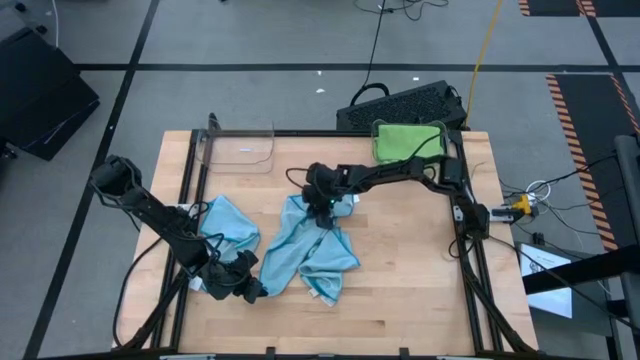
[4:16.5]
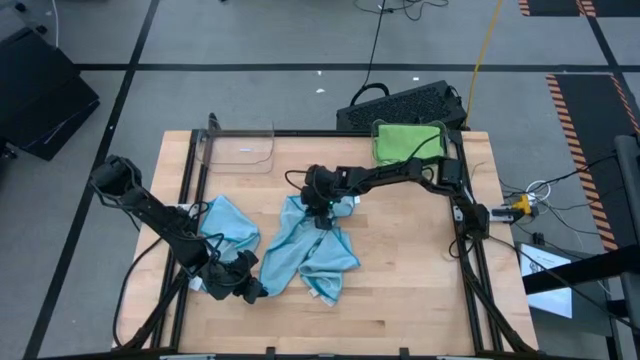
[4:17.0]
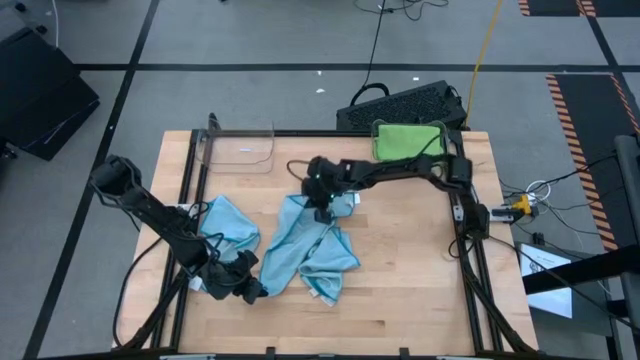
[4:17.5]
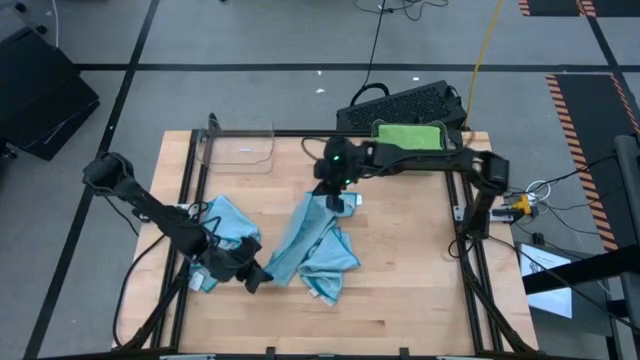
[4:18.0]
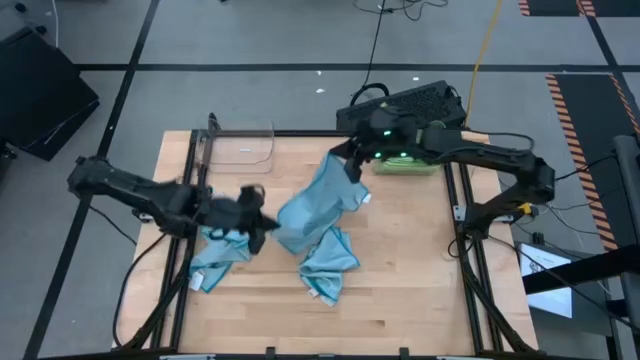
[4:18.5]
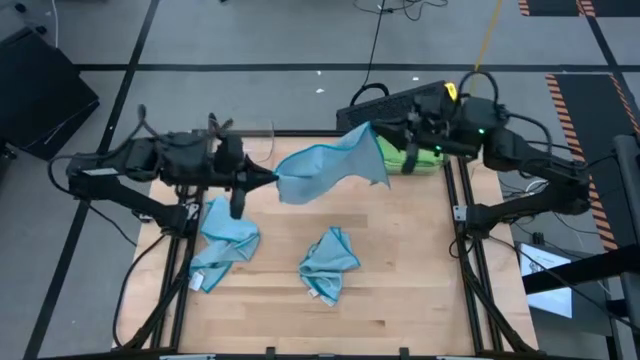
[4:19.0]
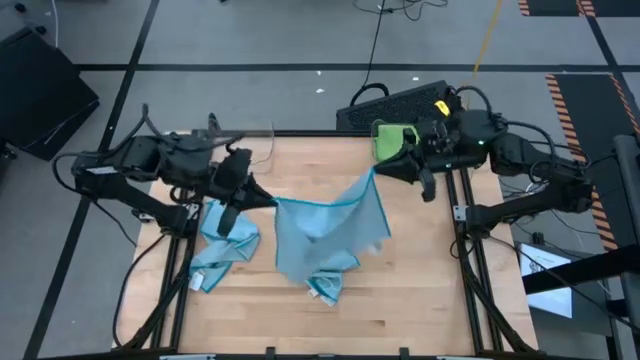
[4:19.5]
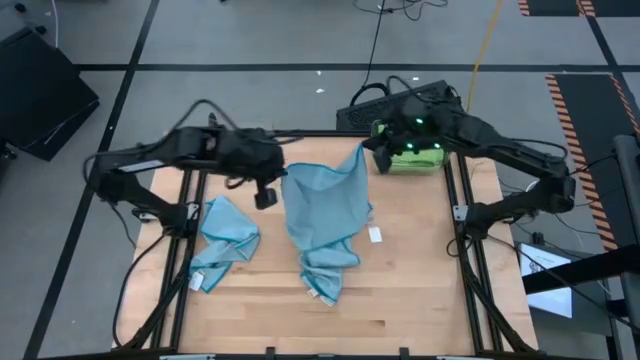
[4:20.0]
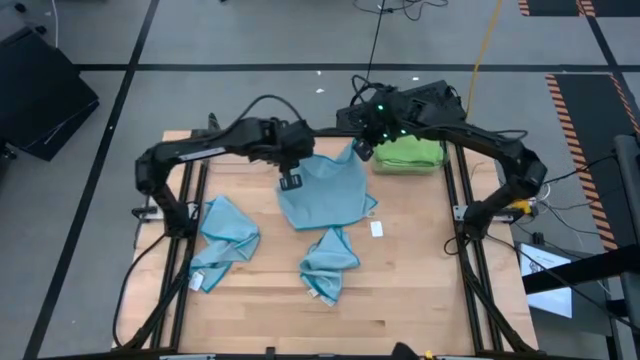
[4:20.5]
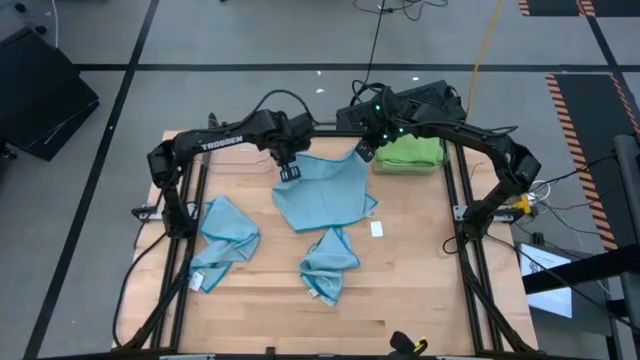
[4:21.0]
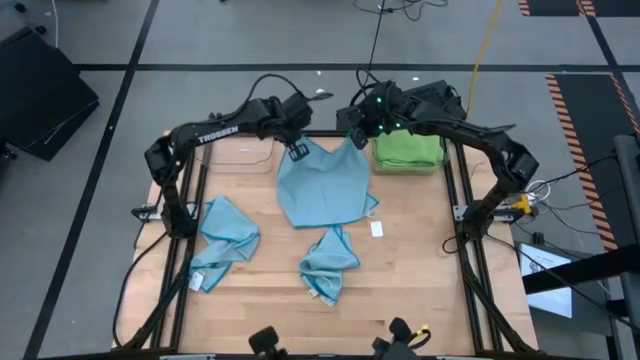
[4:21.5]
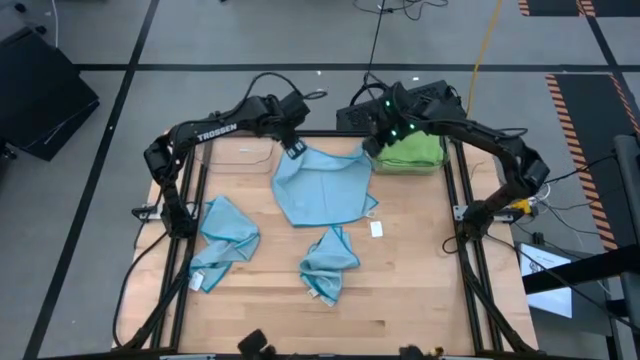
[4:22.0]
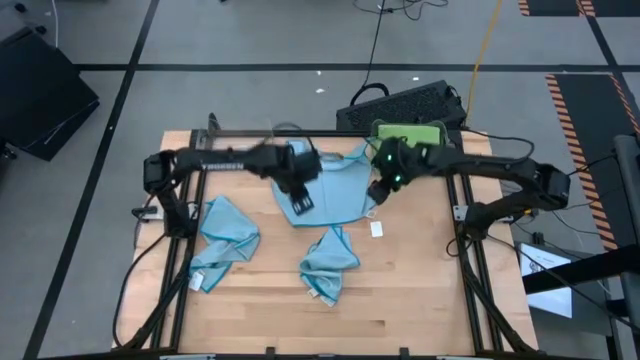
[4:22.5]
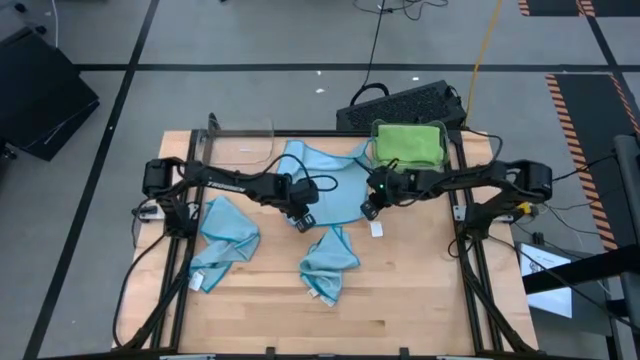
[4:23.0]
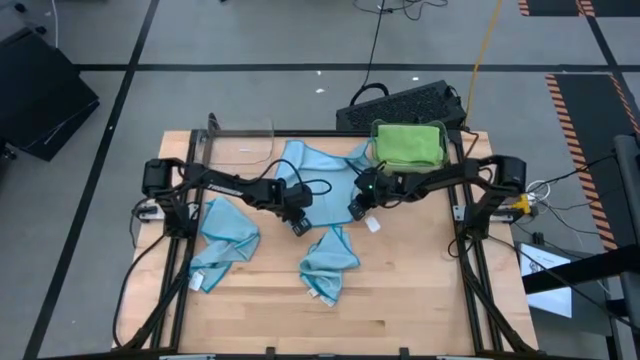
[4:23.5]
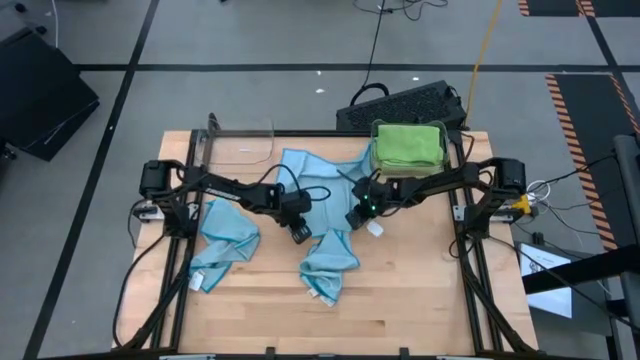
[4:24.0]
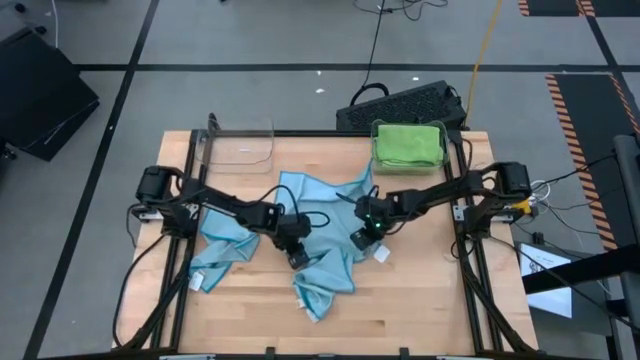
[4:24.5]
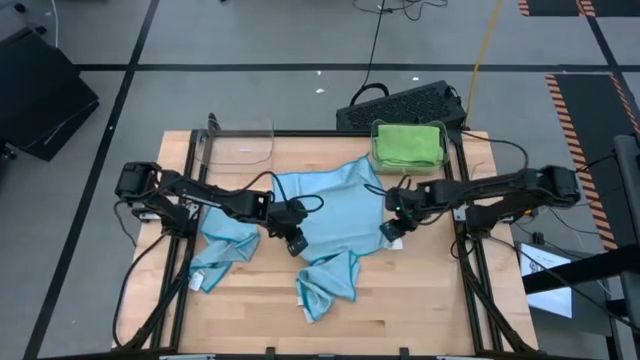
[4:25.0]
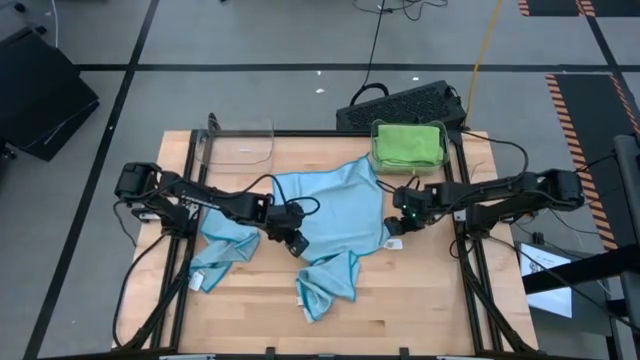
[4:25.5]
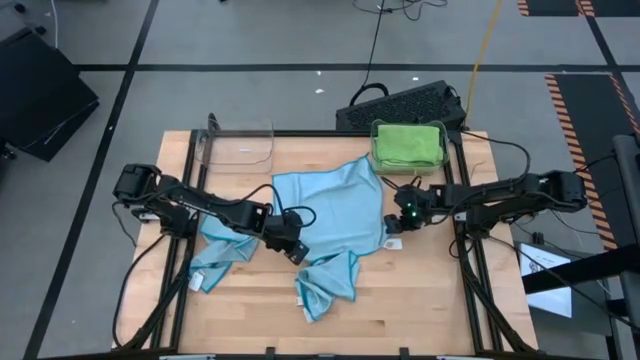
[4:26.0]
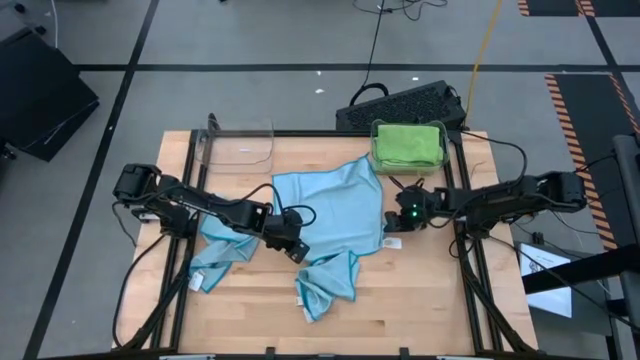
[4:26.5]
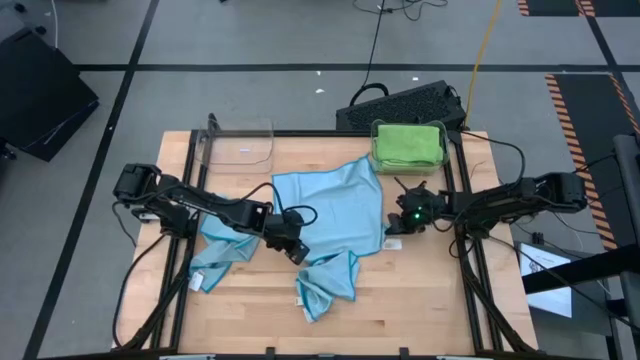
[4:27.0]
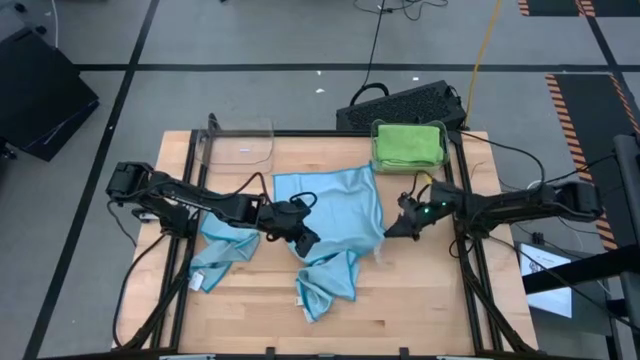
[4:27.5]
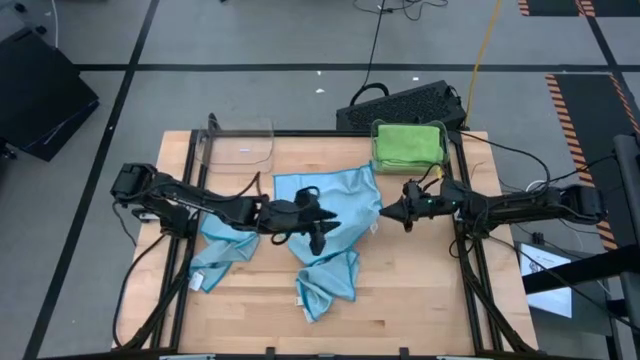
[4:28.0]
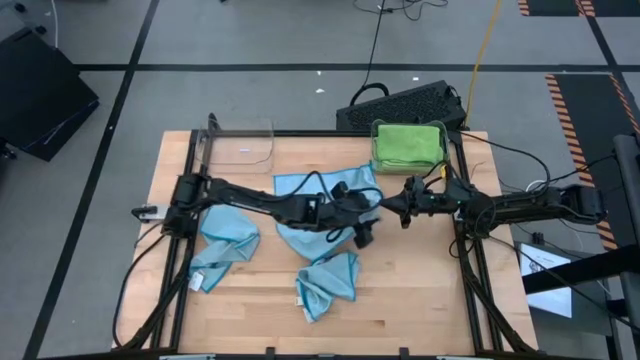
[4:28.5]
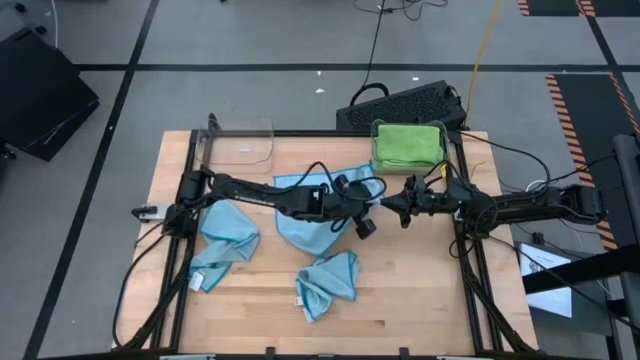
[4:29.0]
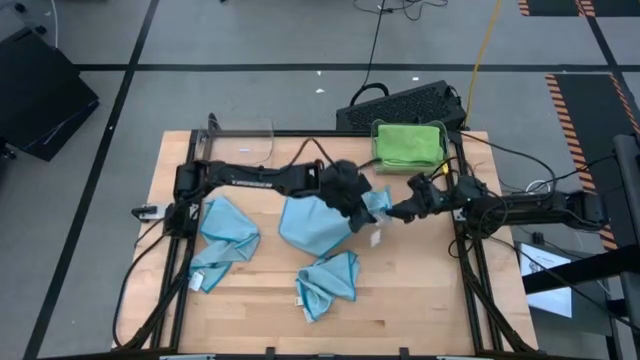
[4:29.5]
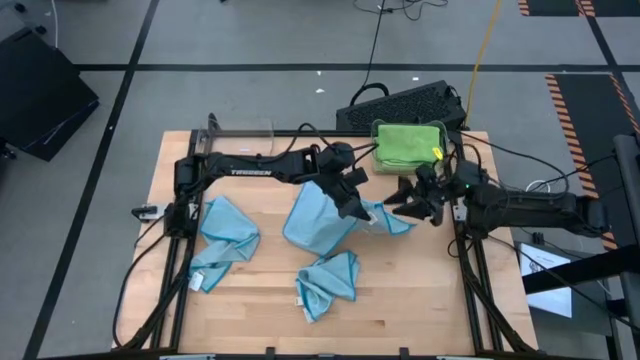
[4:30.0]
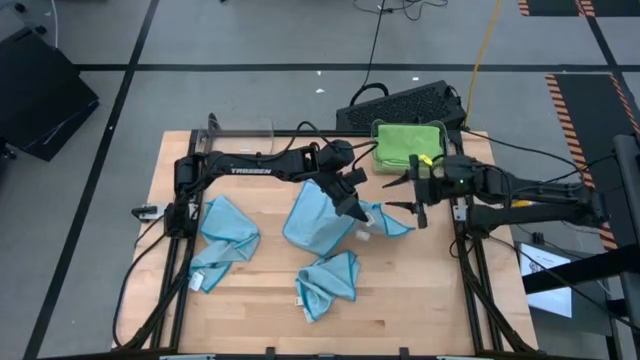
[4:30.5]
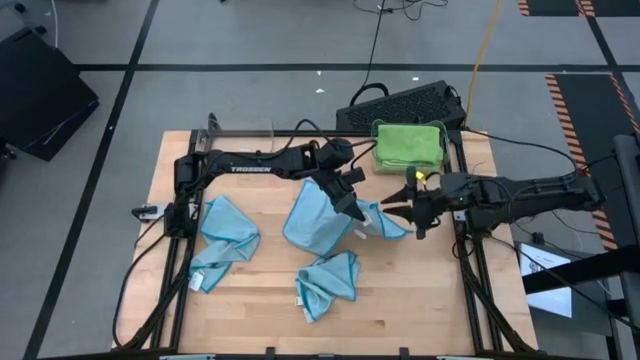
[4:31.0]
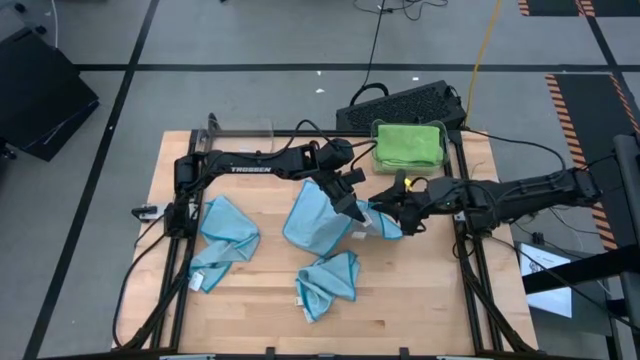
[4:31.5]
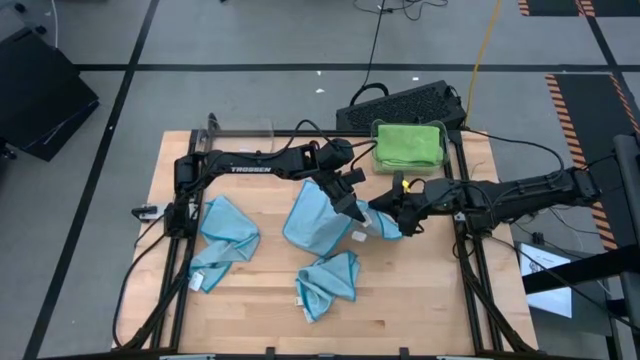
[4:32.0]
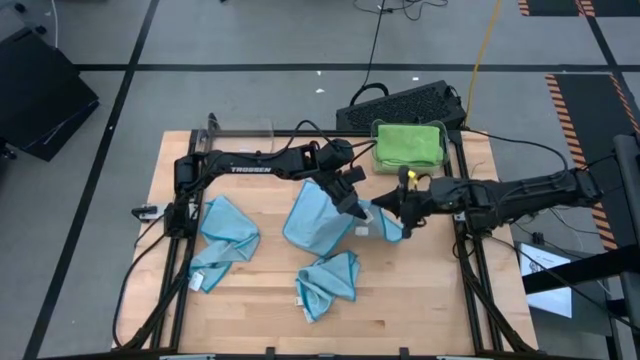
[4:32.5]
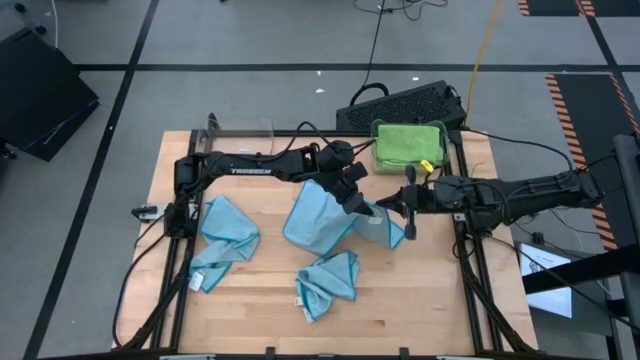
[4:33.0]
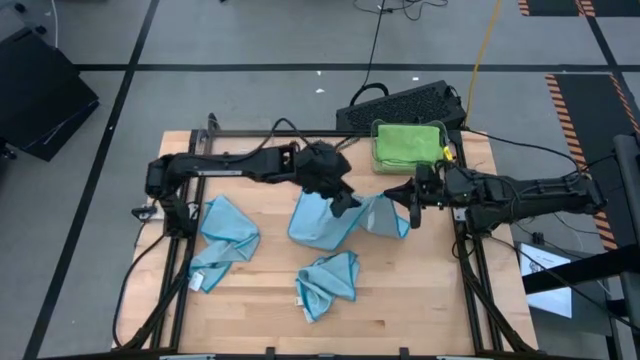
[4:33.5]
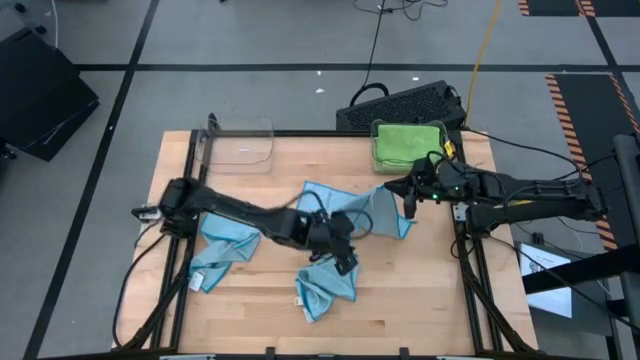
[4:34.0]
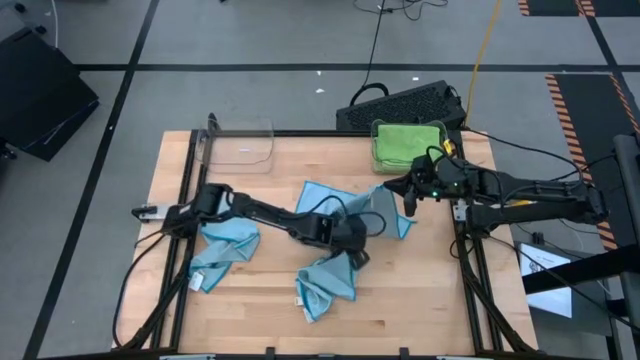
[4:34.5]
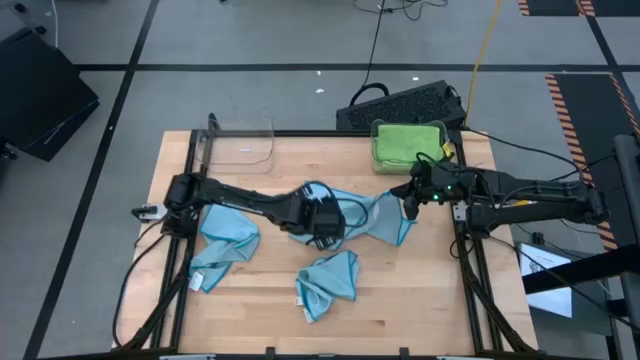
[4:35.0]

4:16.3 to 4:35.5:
Task: Sort microfiber towel by color & place in baskets
Fold the top blue towel

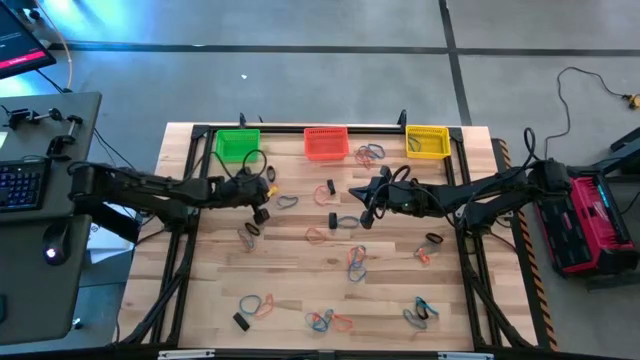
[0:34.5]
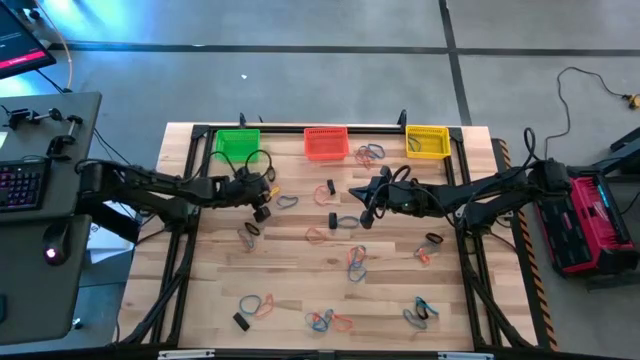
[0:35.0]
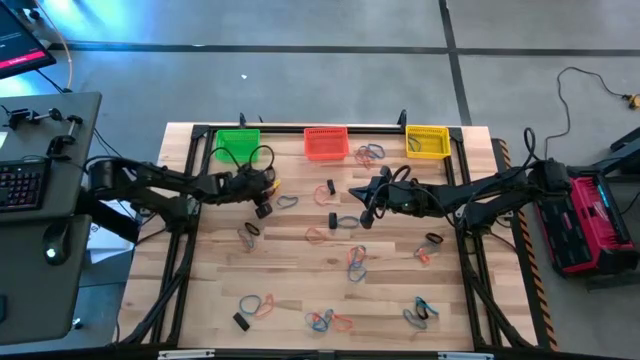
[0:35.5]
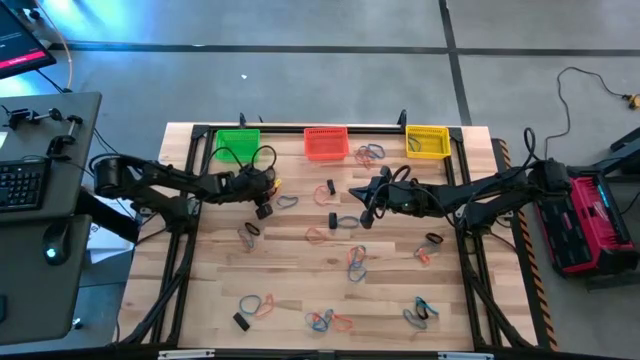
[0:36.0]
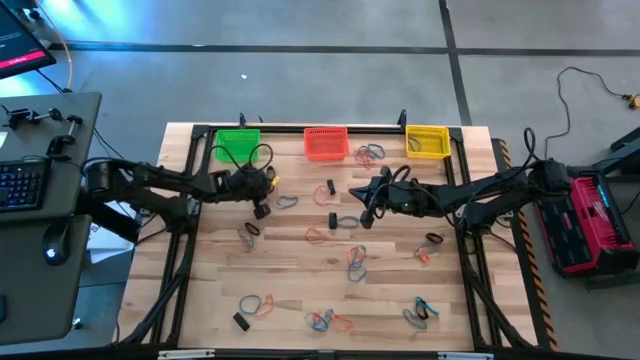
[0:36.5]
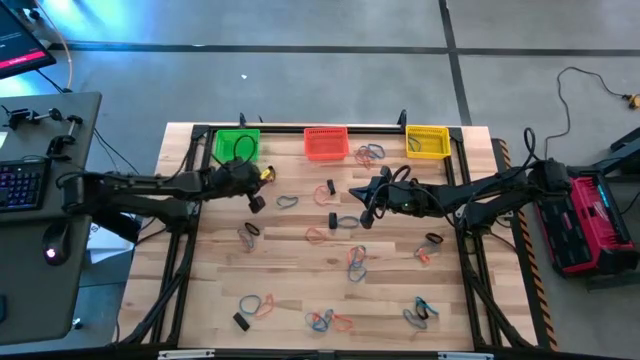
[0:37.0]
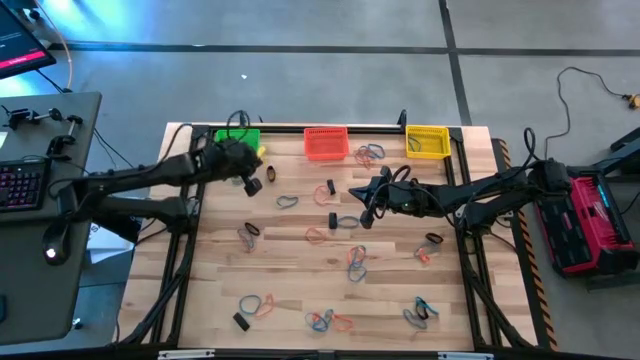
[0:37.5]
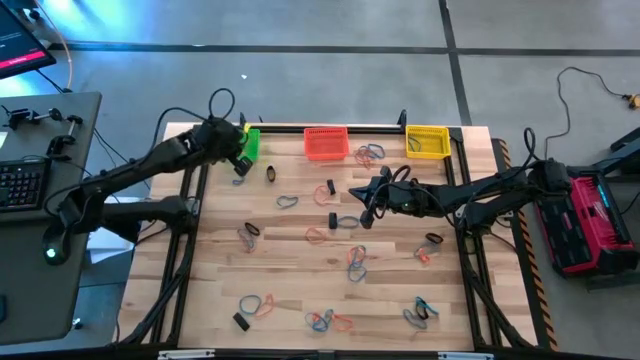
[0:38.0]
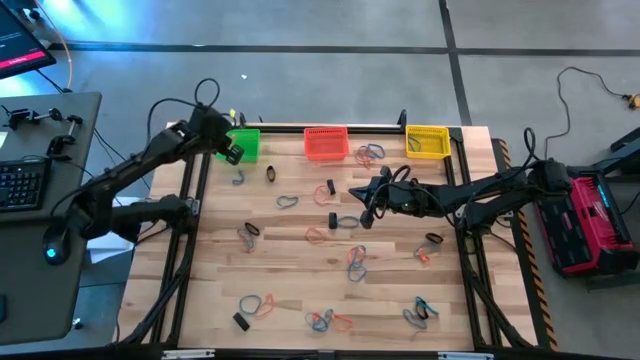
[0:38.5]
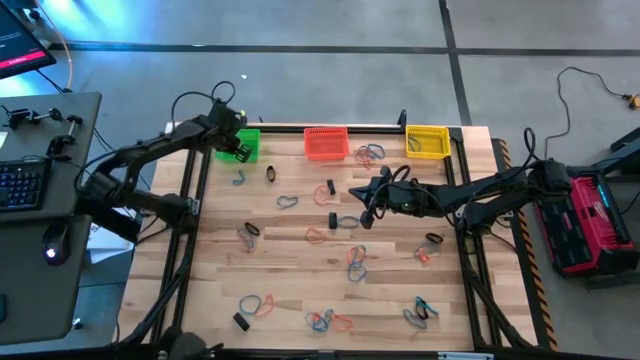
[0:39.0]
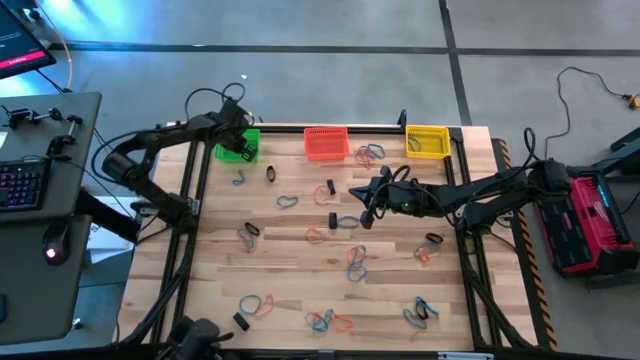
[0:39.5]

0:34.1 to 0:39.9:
Task: Sort rubber bands into baskets
Put the orange rubber band into the green bin
